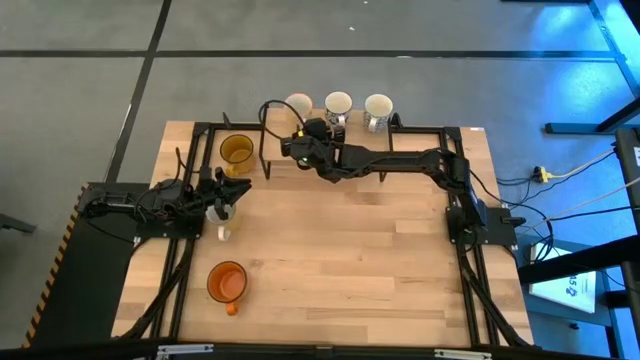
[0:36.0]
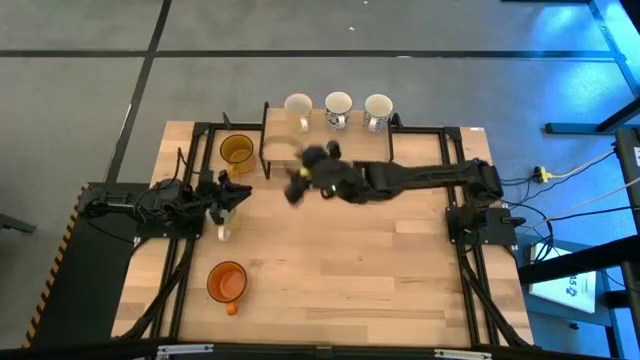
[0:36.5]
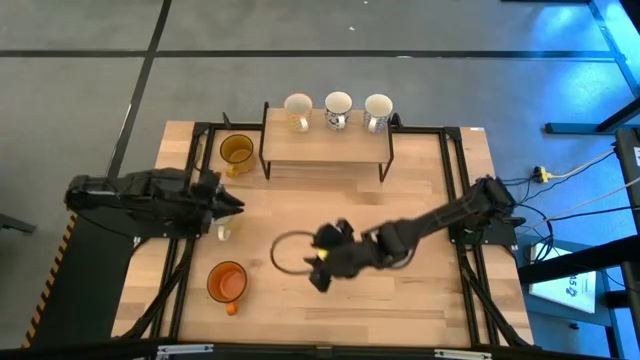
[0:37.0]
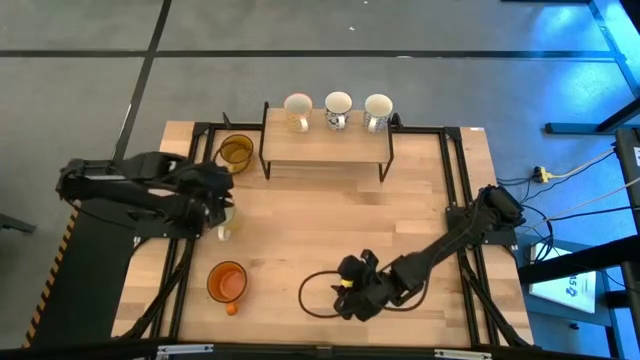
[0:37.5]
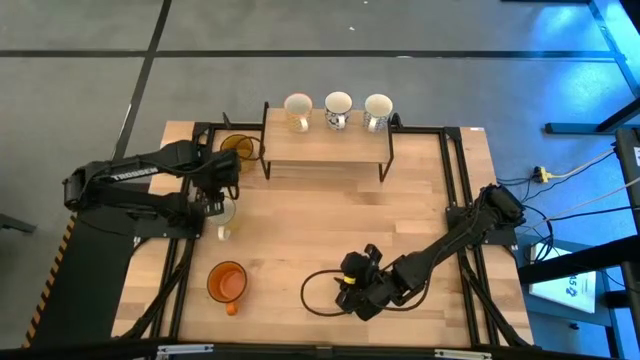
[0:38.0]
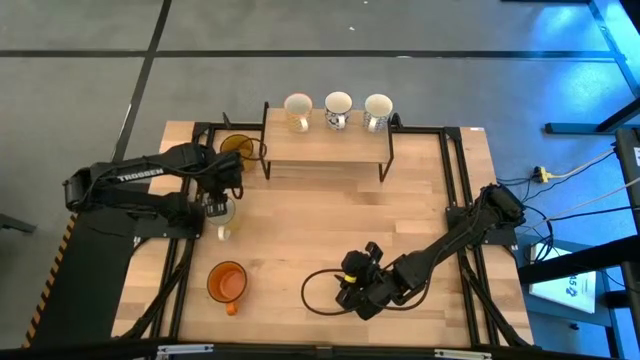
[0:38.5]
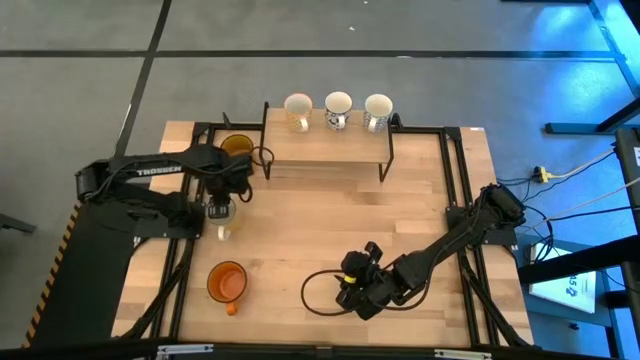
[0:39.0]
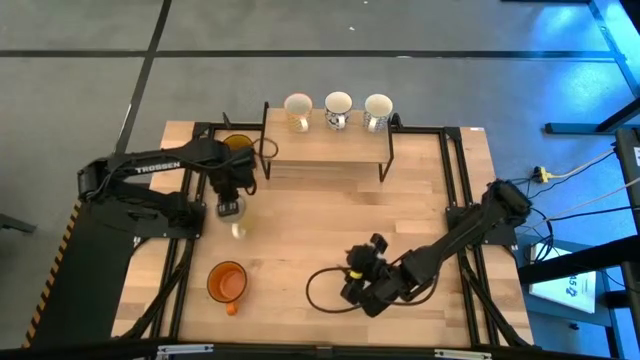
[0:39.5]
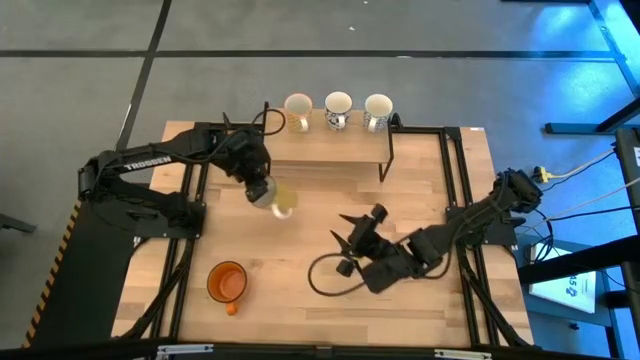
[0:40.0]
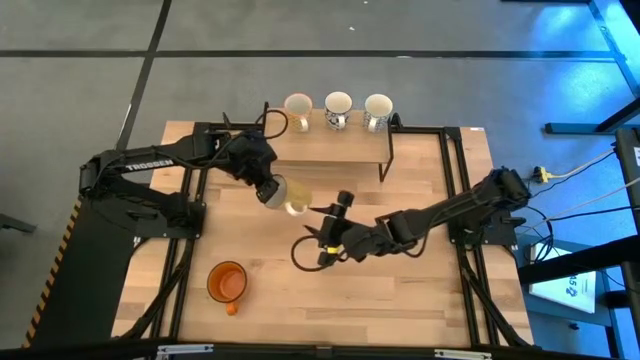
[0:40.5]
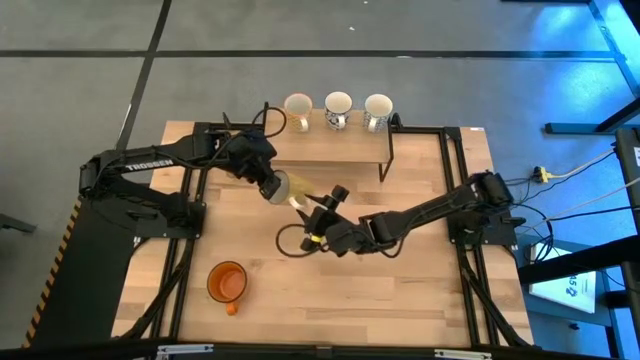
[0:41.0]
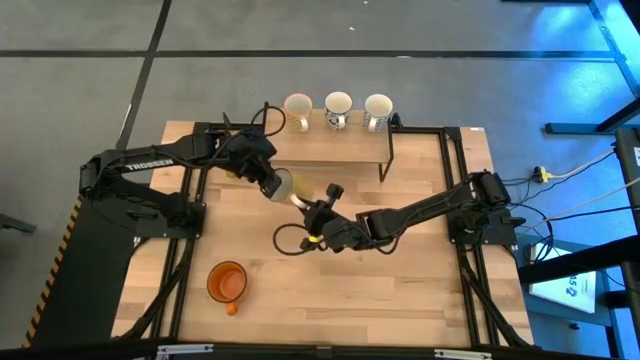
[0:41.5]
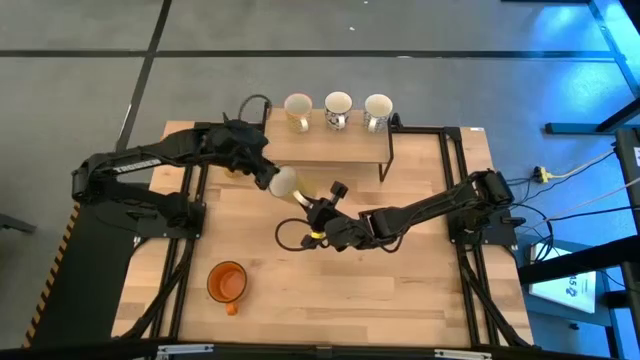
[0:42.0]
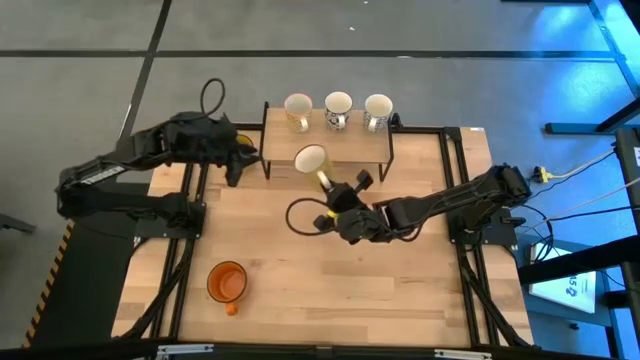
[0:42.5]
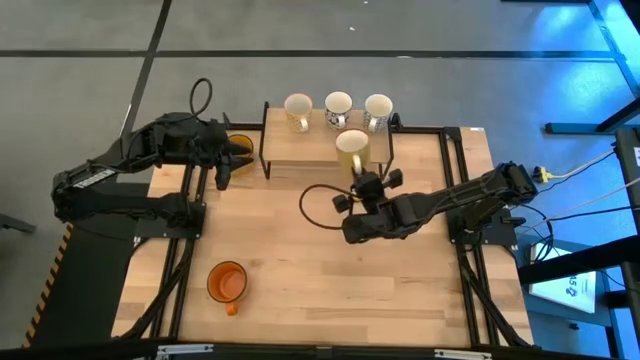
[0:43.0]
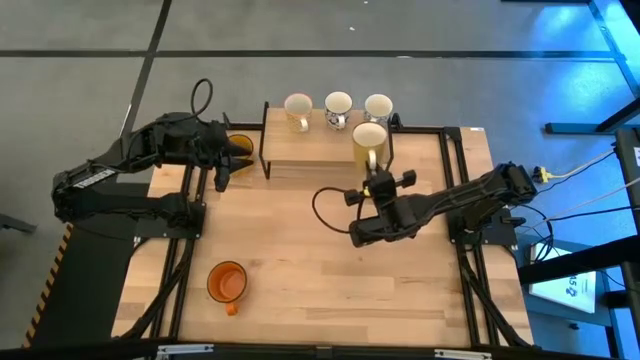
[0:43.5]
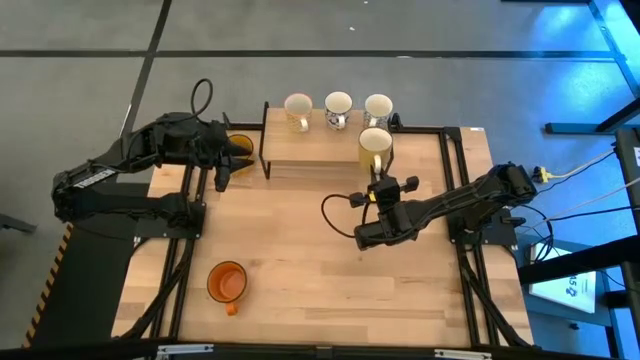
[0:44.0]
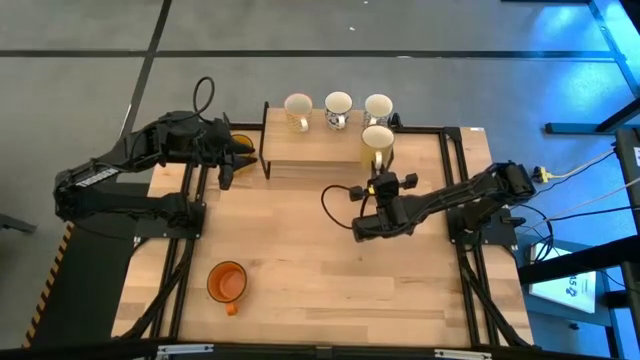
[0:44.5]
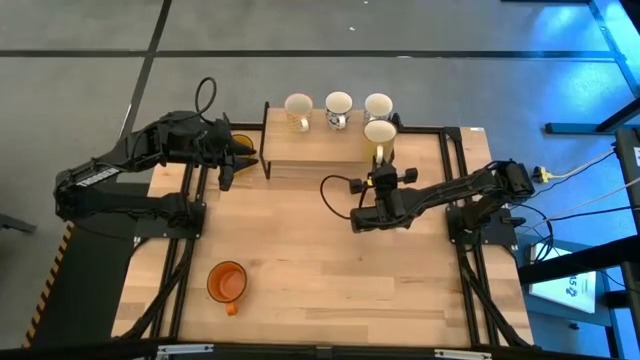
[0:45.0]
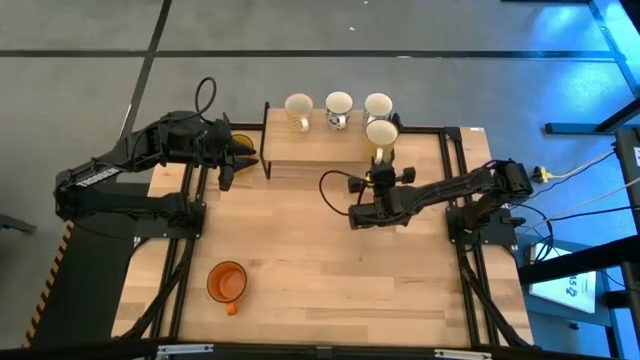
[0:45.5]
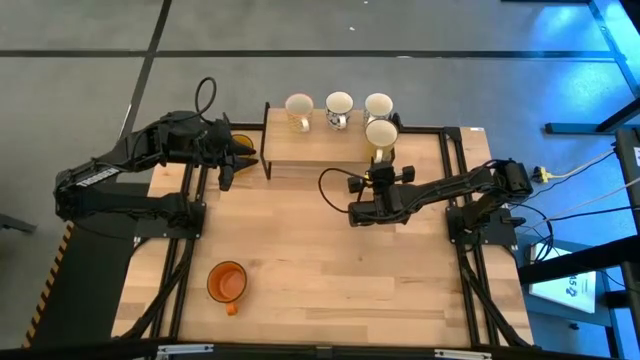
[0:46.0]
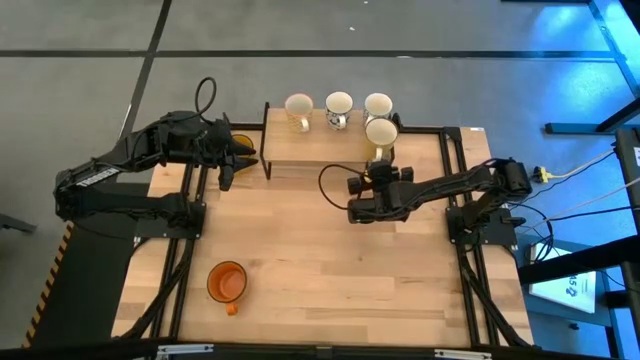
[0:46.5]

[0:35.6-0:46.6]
Task: Place coffee mugs
Put the light yellow mug on the shelf

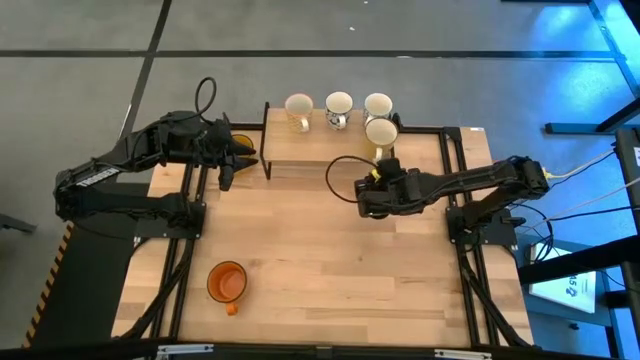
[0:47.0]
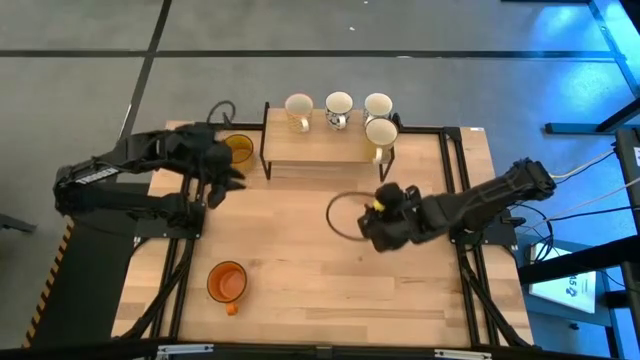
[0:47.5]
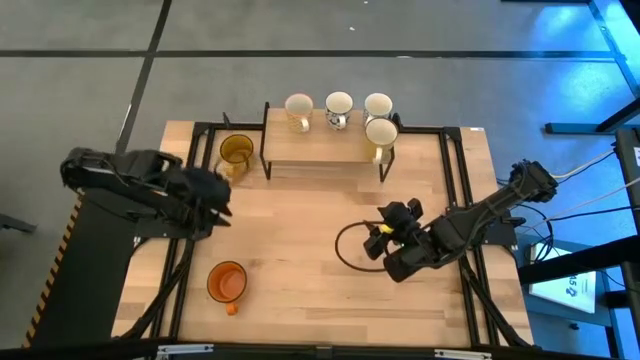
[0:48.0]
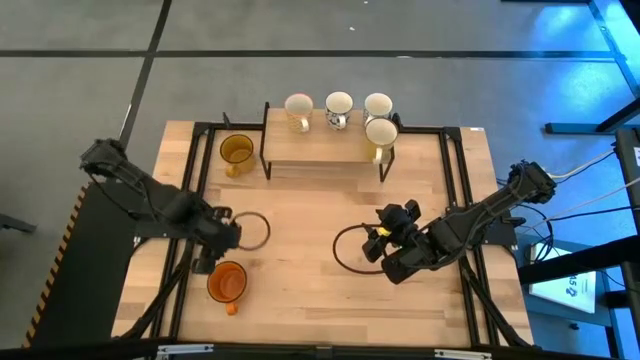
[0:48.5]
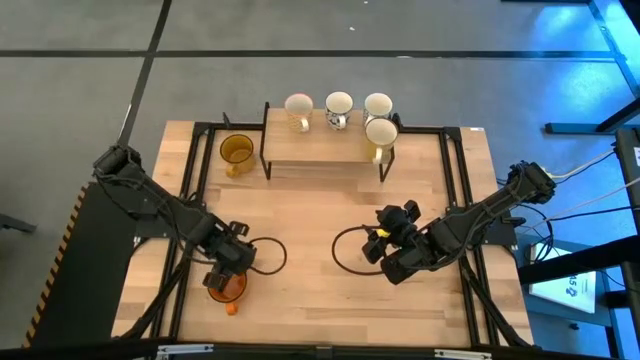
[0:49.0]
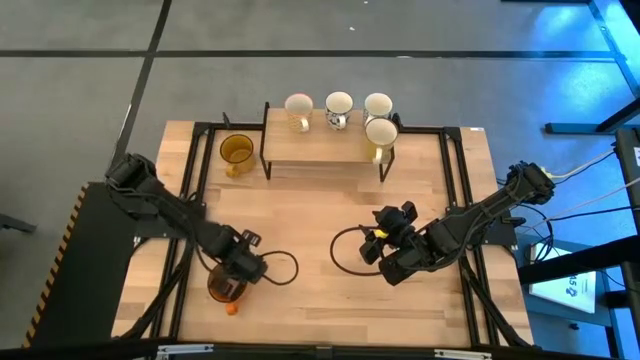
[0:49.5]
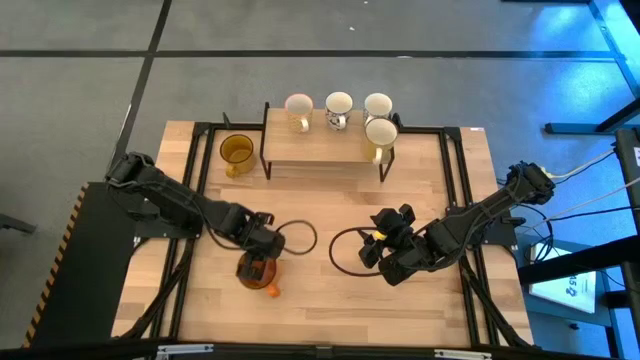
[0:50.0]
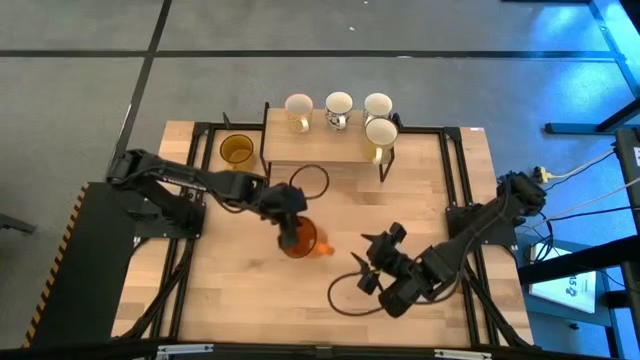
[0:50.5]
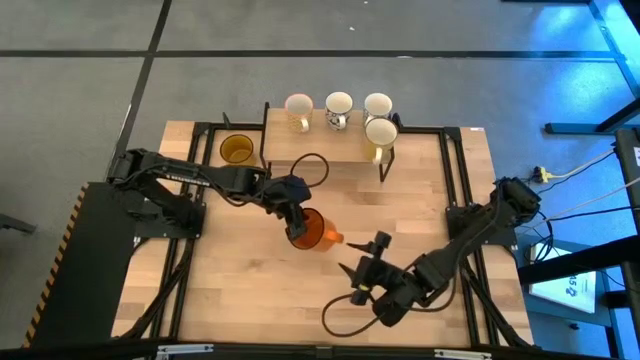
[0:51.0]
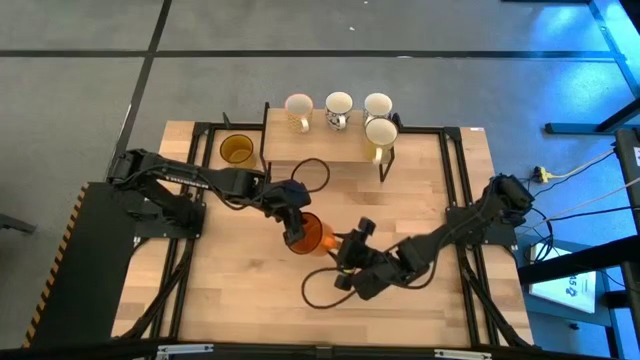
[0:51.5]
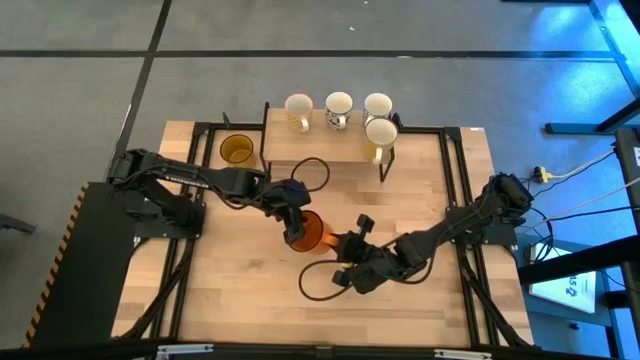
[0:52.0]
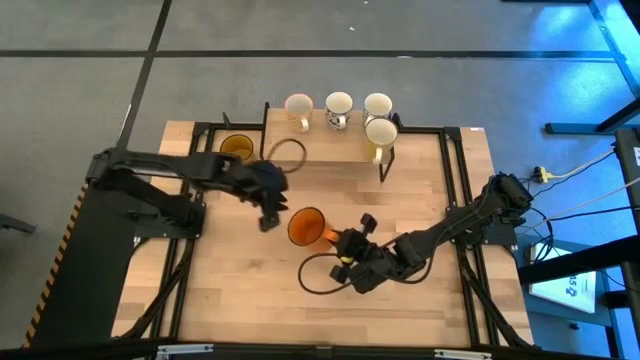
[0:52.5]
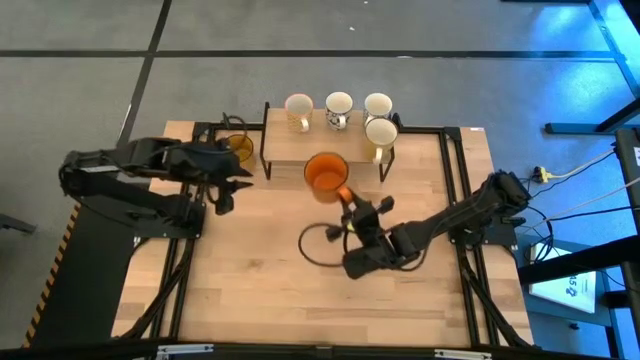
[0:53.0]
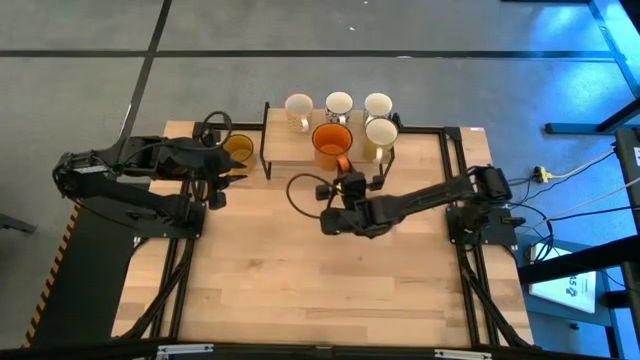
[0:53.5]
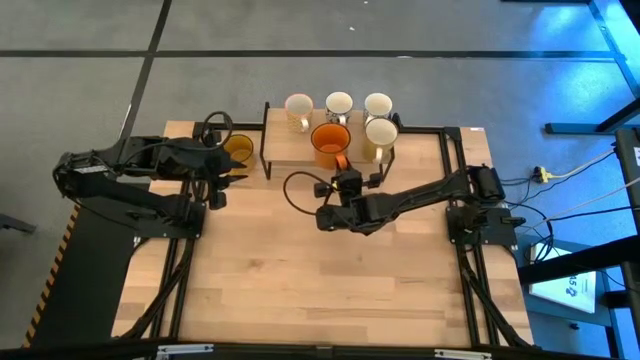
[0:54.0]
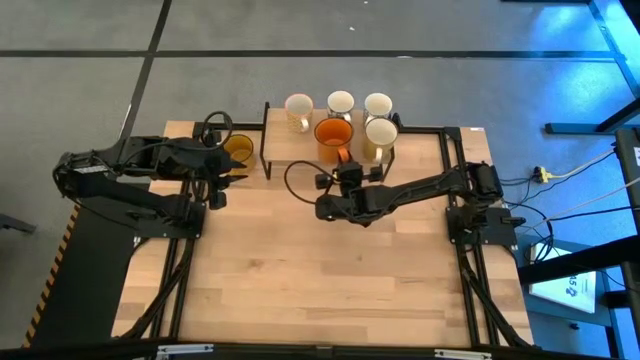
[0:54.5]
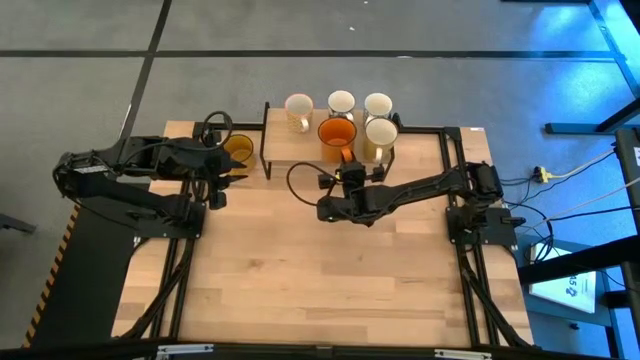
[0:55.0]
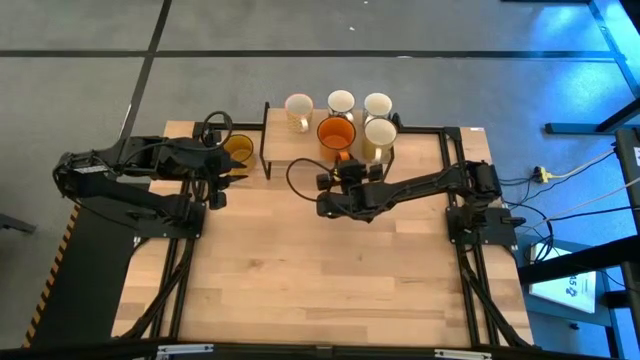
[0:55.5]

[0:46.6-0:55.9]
Put the orange mug on the shelf

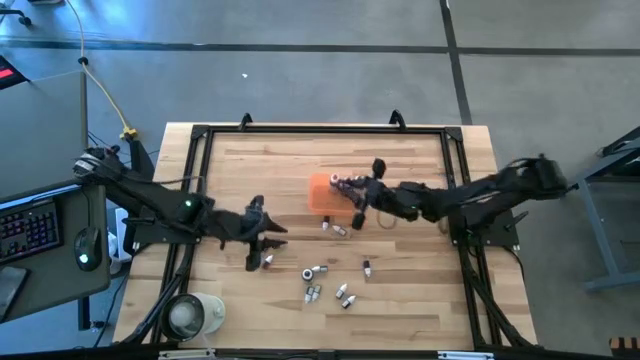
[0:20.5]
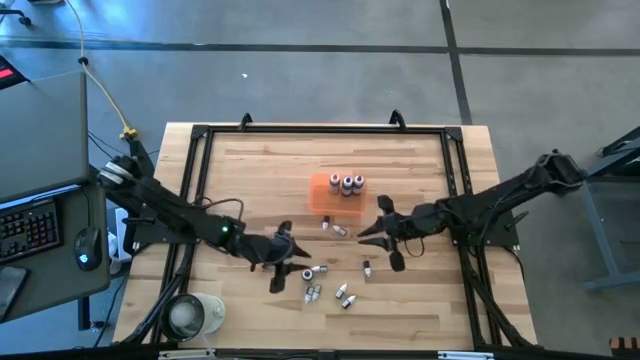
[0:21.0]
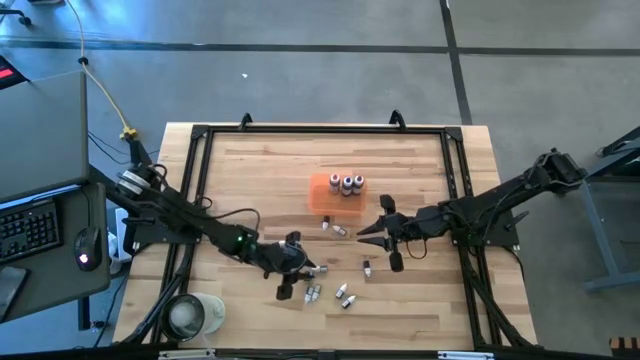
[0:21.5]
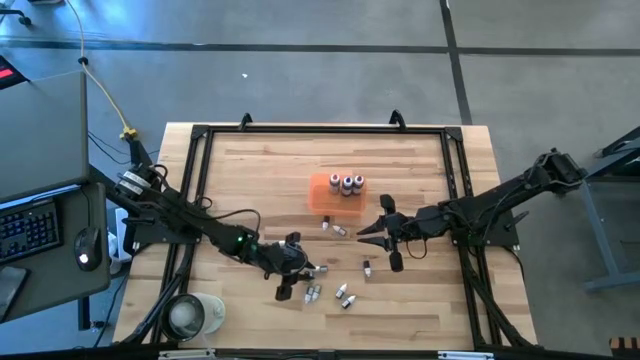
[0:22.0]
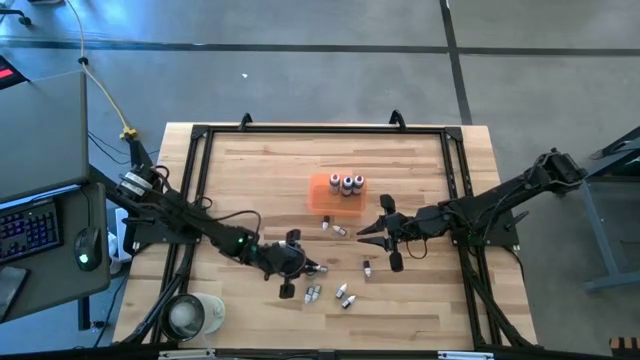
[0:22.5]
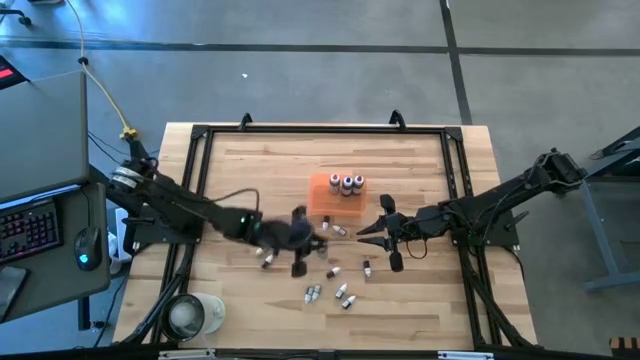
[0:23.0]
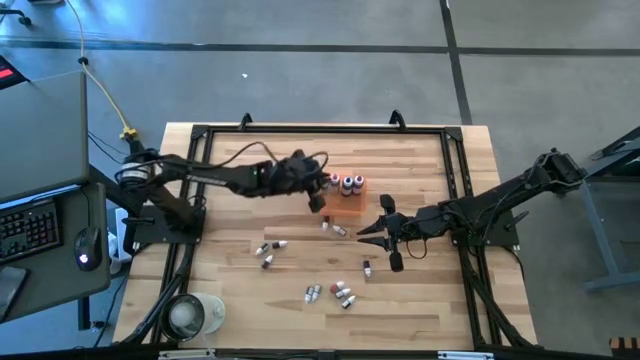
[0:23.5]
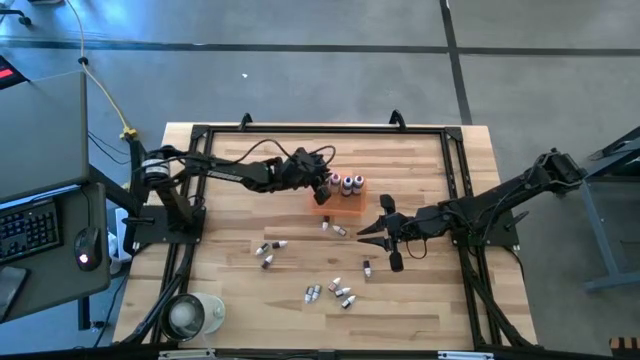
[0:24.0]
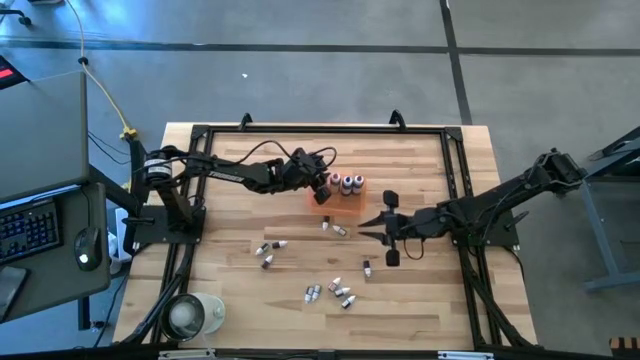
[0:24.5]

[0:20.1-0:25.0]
Task: Pick & Place food coloring
Put the large black food coloring bottle into the orange bin
